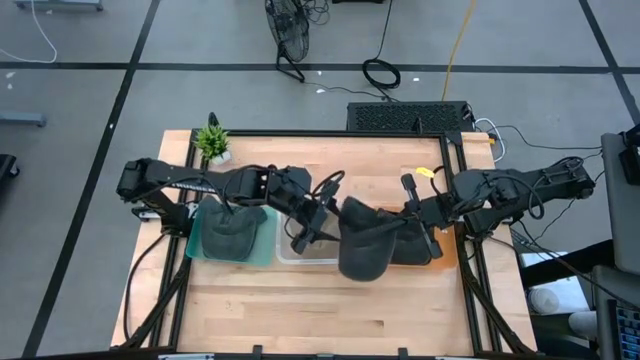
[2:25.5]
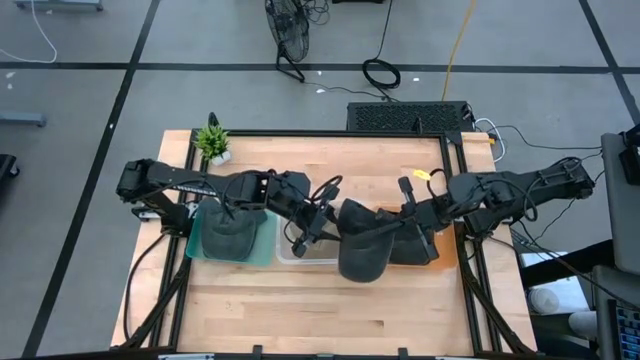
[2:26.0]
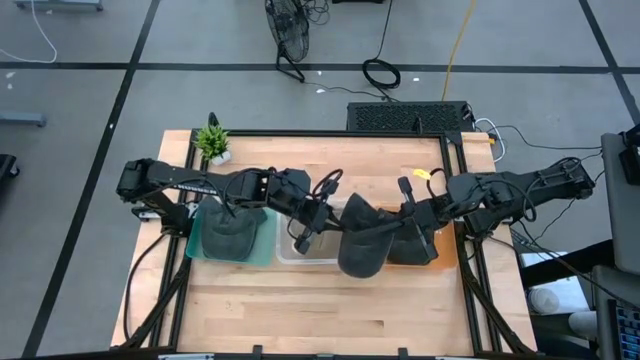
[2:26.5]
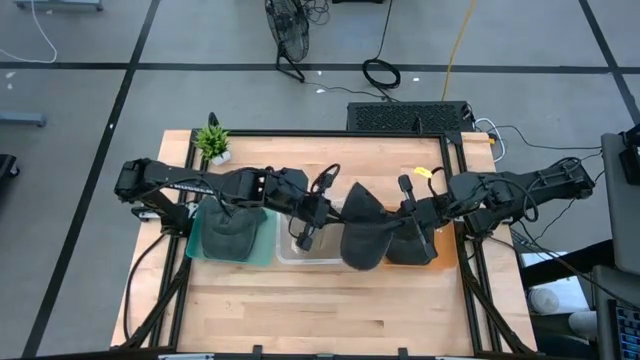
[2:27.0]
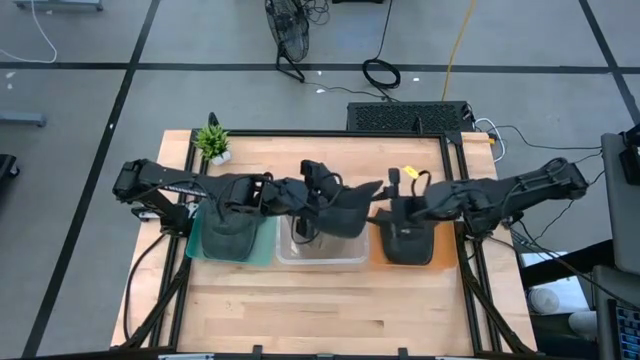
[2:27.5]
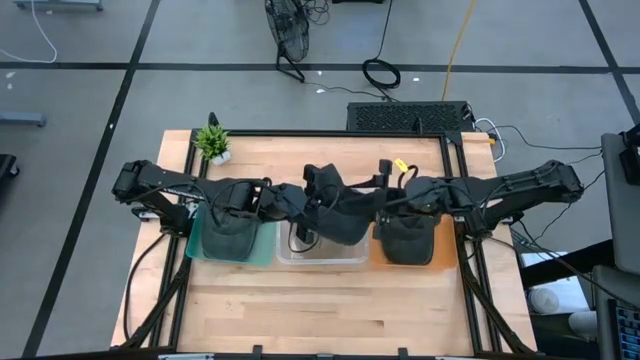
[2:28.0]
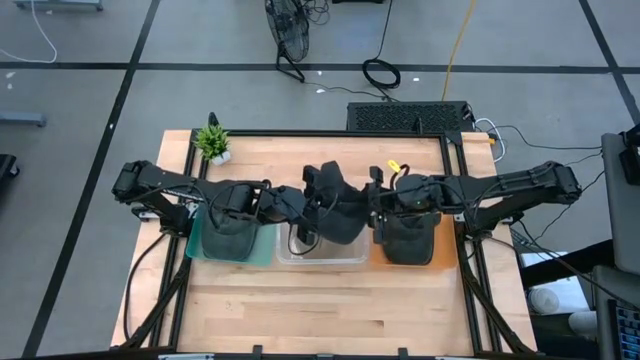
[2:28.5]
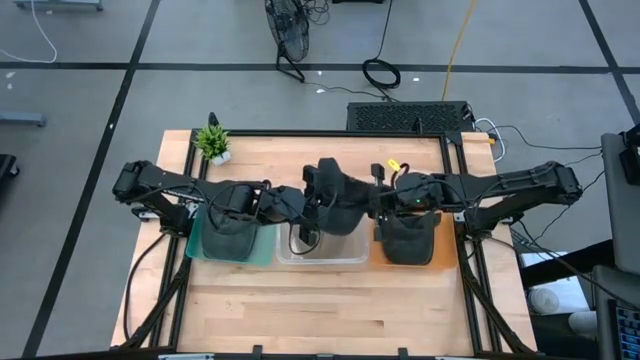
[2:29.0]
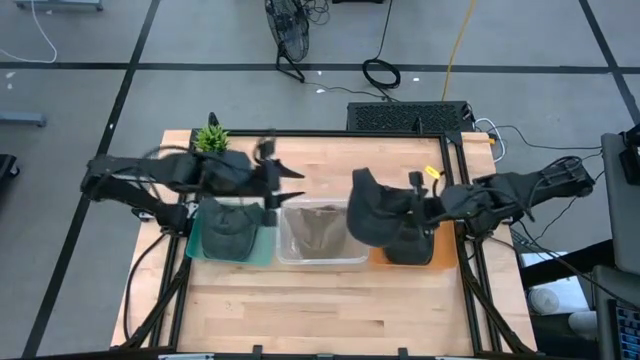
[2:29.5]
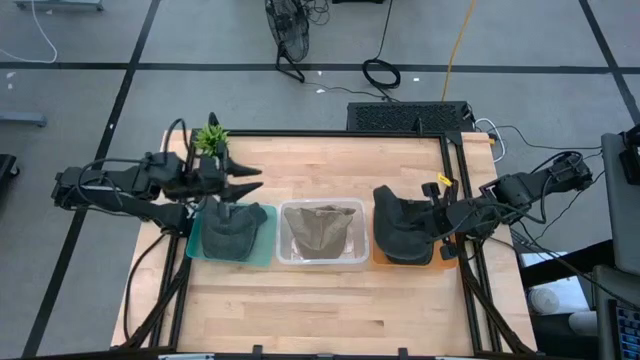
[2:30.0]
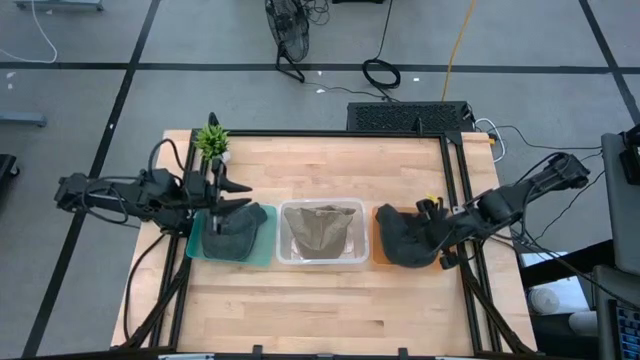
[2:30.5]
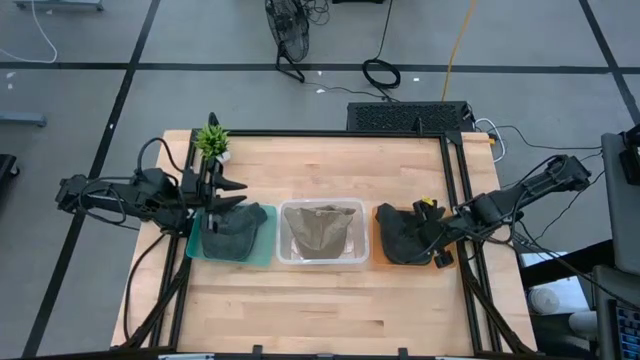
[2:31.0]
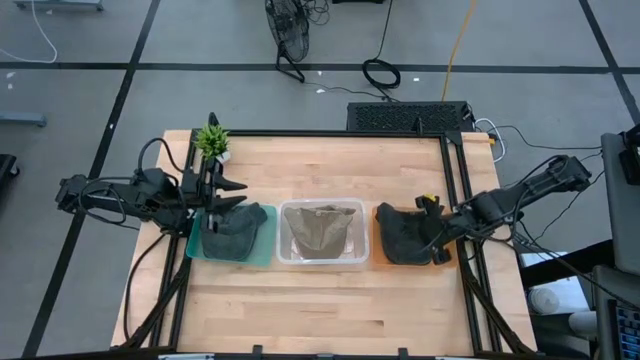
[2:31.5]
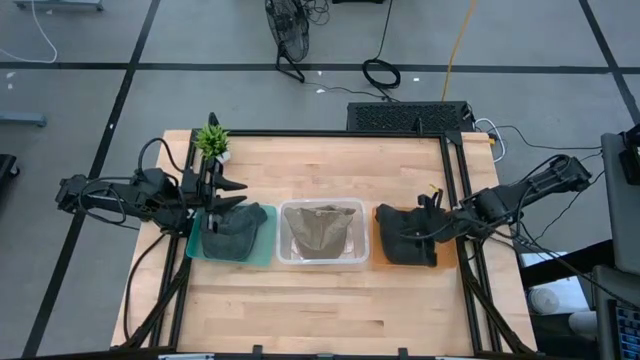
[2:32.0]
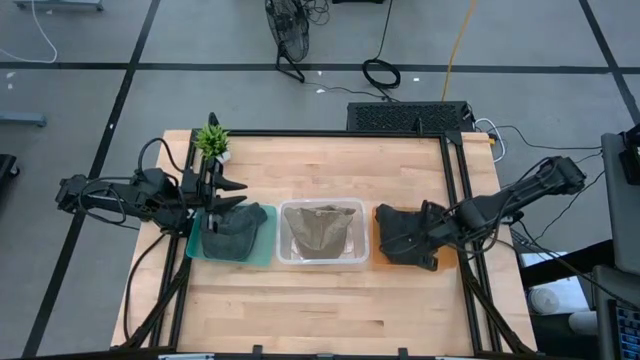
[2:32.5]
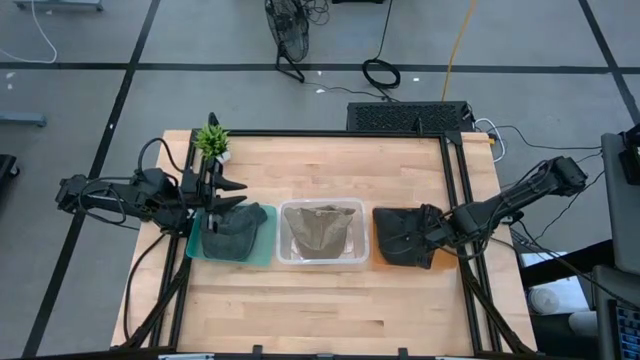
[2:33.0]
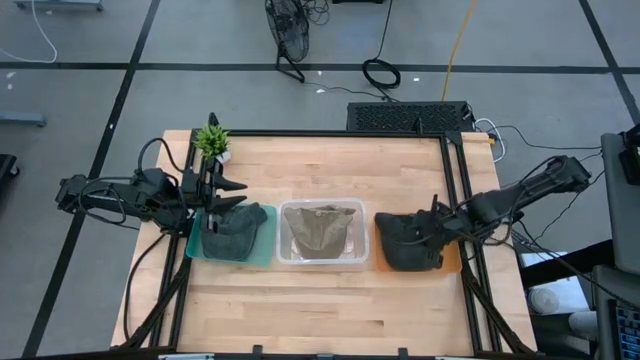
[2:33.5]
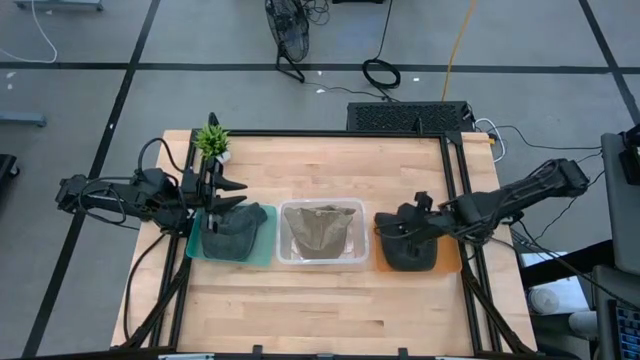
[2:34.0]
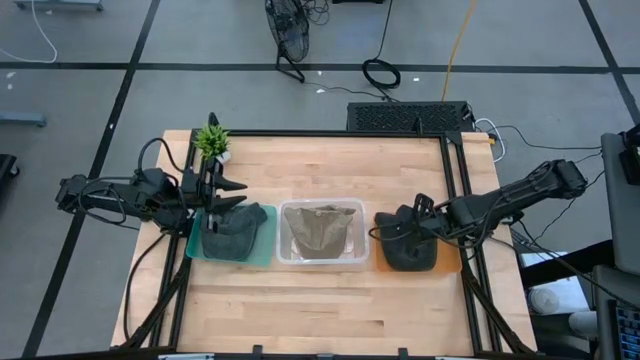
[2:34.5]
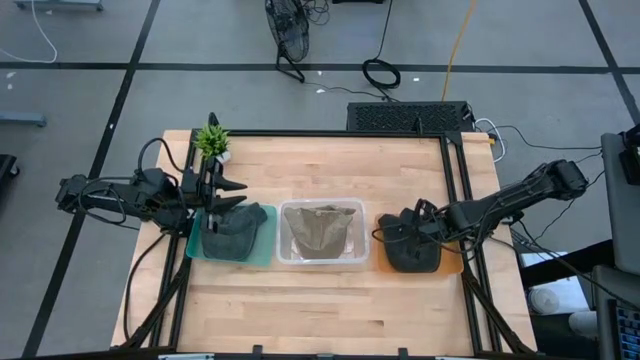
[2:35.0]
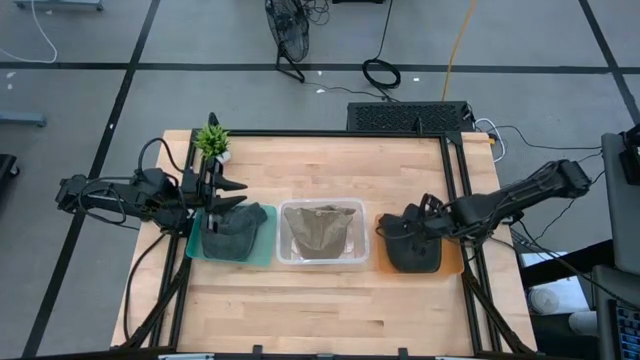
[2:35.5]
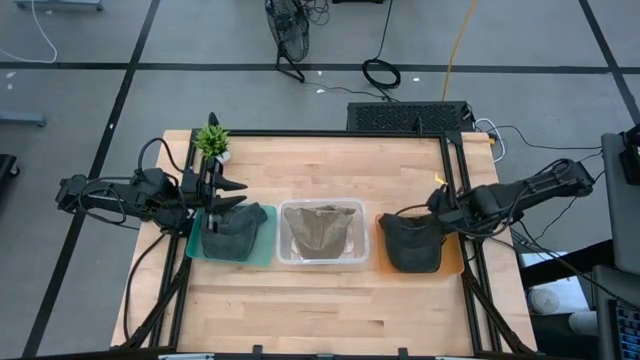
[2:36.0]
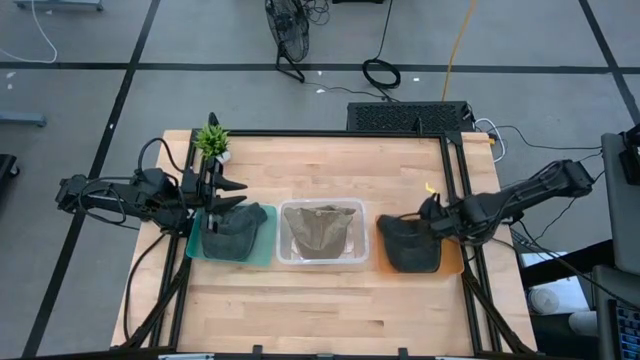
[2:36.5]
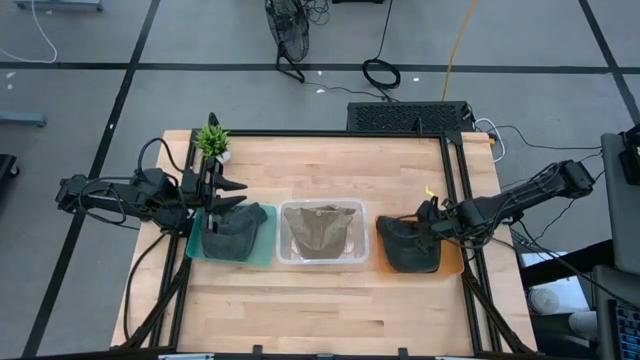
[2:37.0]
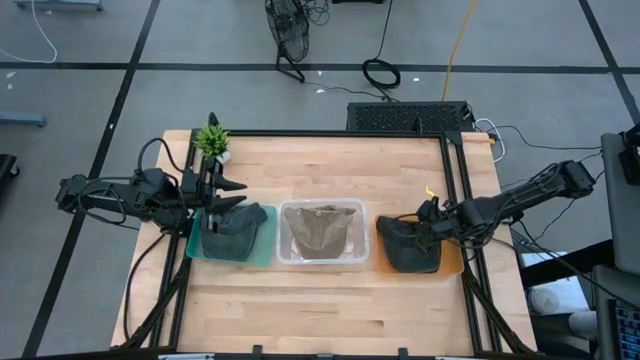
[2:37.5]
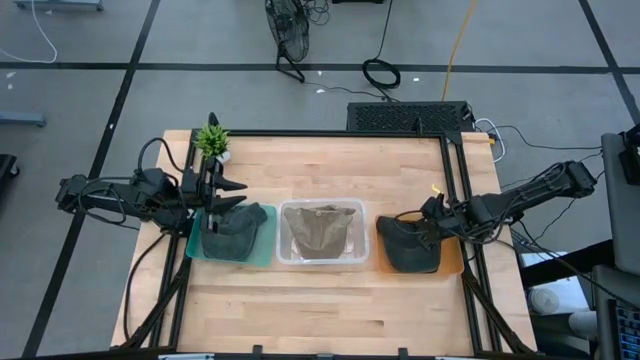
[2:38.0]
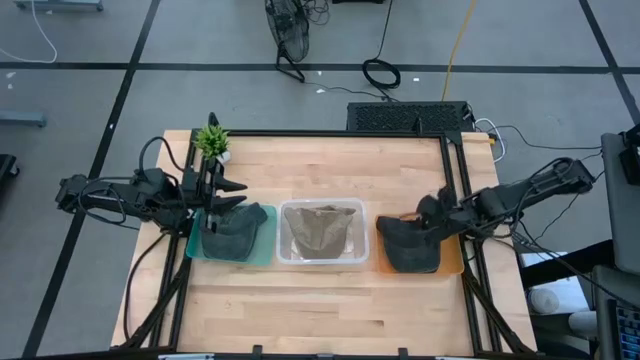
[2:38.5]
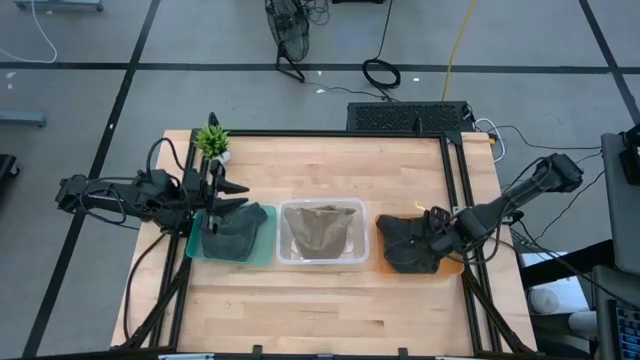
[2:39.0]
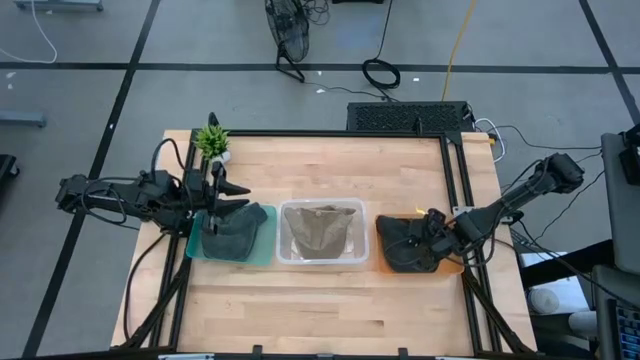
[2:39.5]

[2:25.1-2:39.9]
Task: Pick & Place hat
Put the black cap into the orange bin

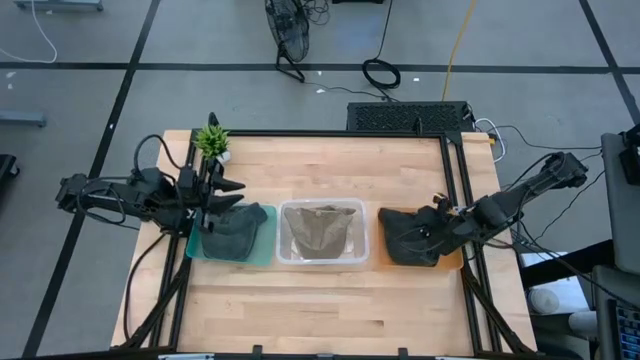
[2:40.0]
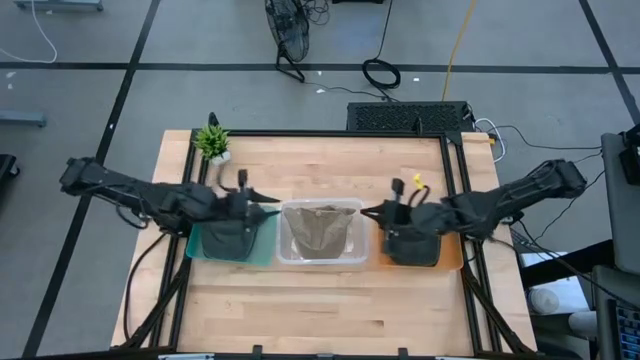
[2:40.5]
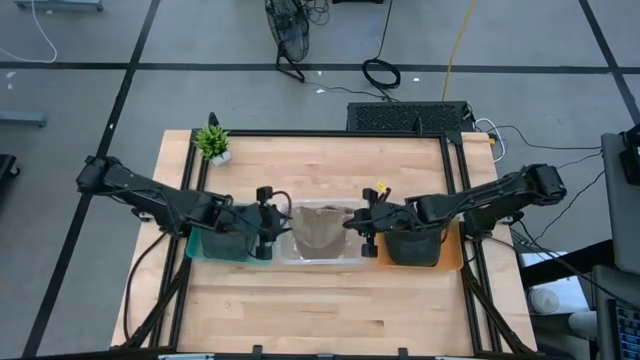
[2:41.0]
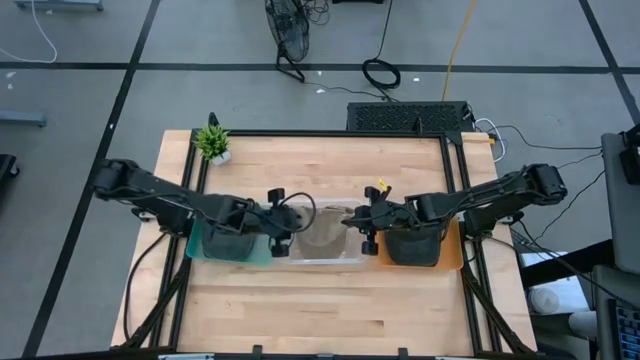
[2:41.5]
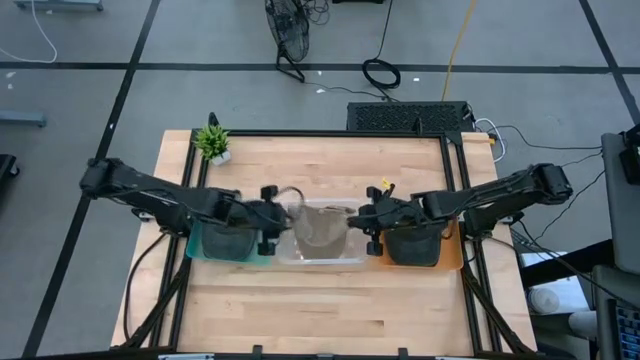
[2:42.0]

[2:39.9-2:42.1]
Adjust the brown cap

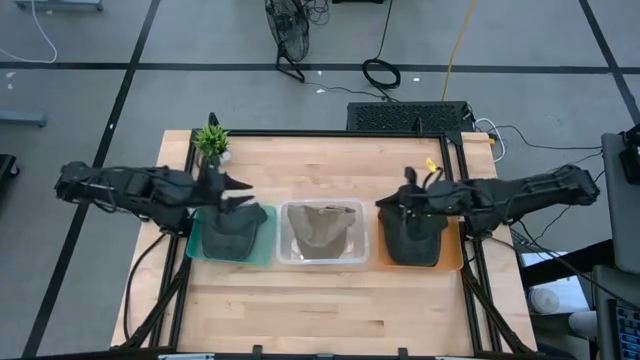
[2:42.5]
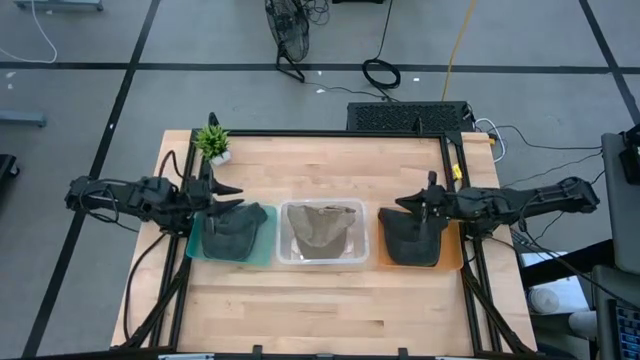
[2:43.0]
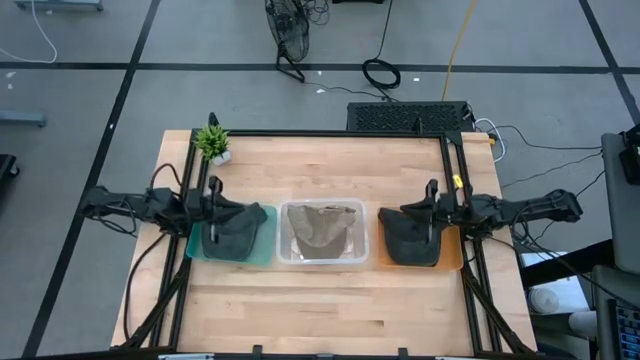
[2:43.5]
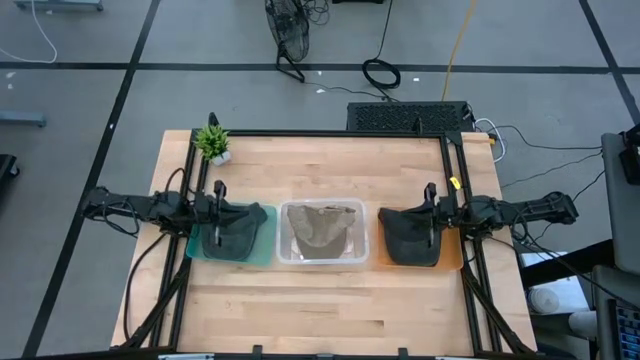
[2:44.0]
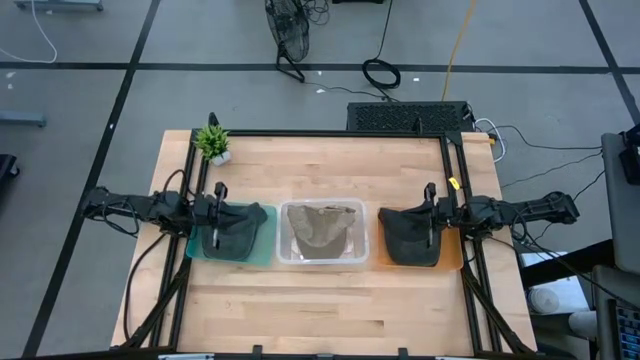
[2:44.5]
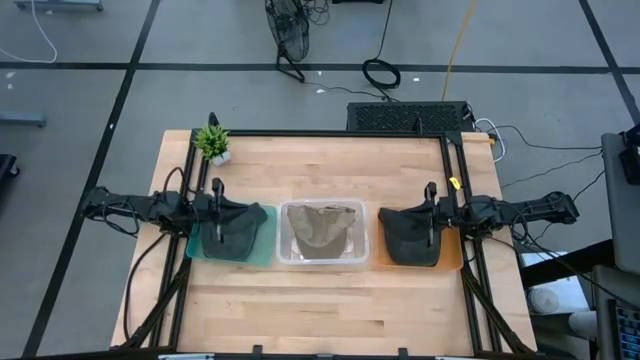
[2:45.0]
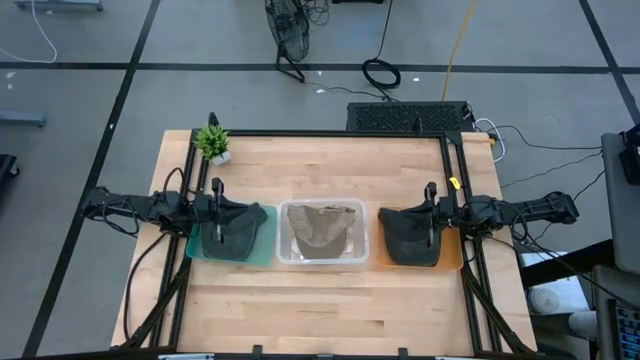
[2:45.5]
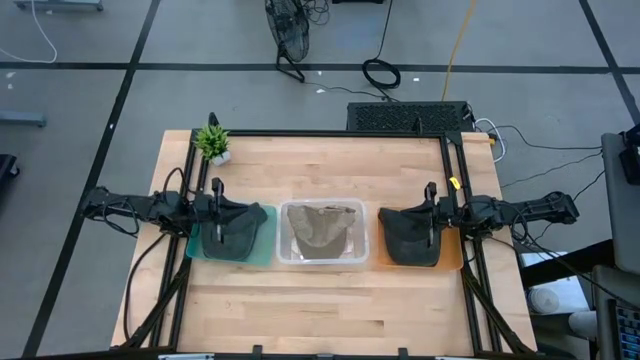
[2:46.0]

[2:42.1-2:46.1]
Return to Home Position
